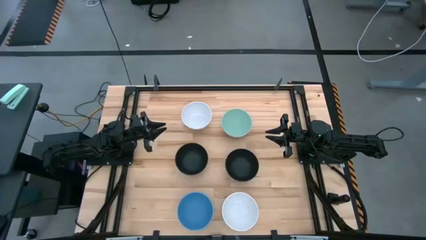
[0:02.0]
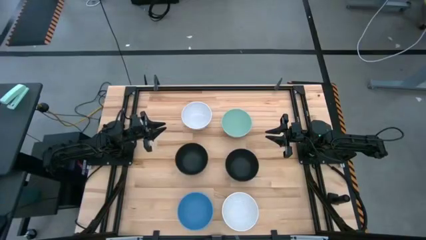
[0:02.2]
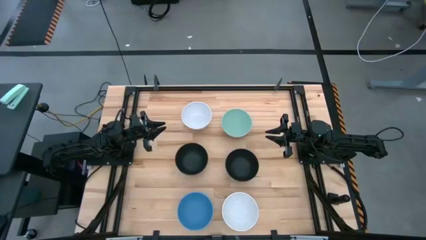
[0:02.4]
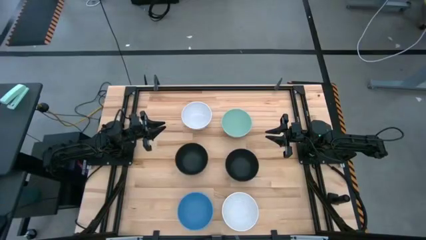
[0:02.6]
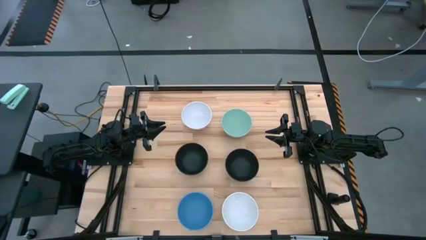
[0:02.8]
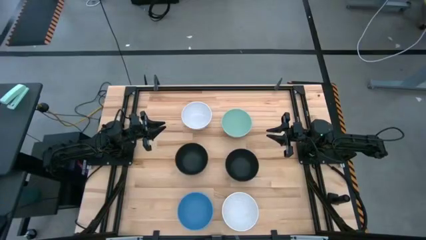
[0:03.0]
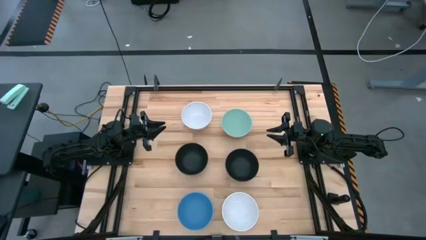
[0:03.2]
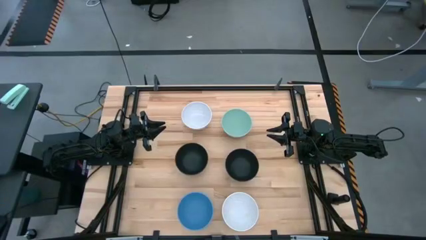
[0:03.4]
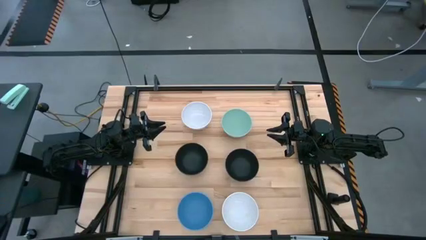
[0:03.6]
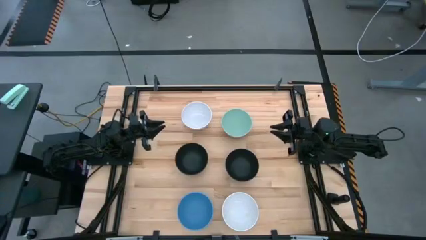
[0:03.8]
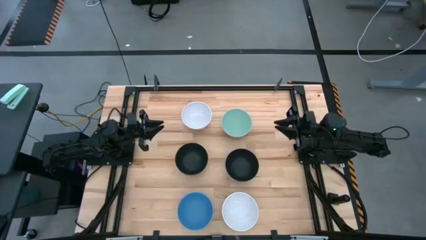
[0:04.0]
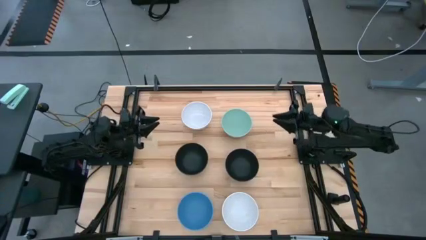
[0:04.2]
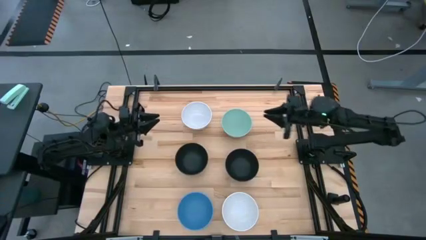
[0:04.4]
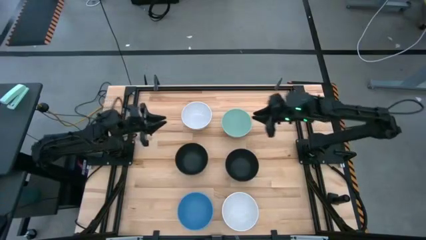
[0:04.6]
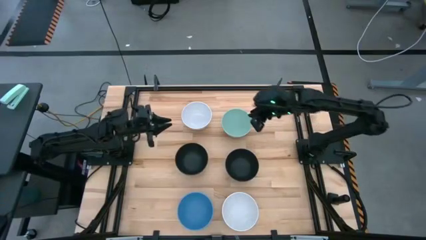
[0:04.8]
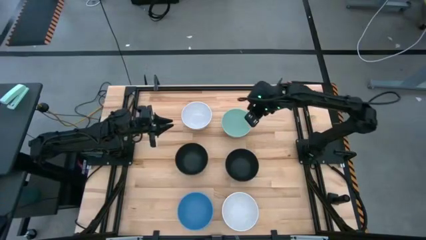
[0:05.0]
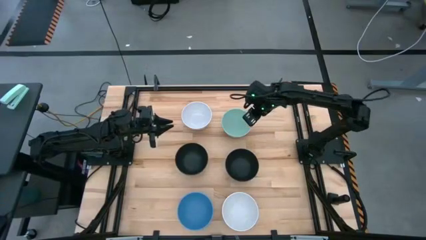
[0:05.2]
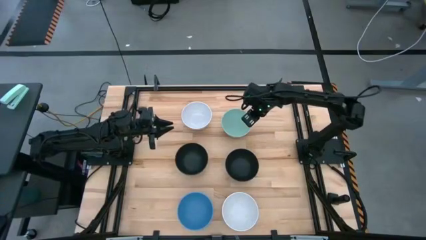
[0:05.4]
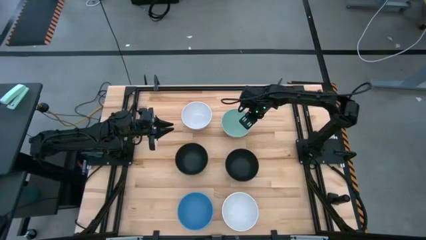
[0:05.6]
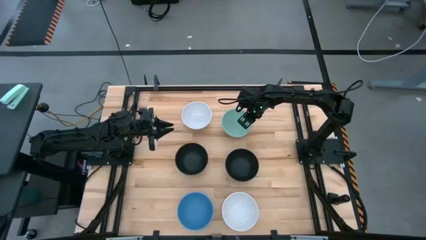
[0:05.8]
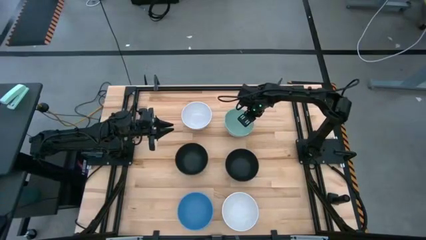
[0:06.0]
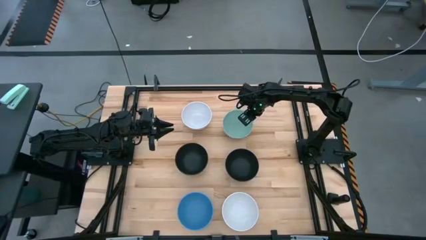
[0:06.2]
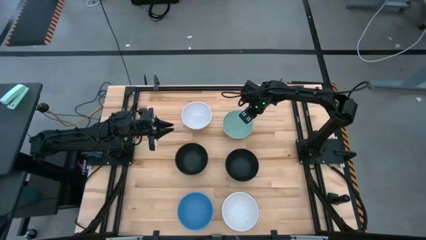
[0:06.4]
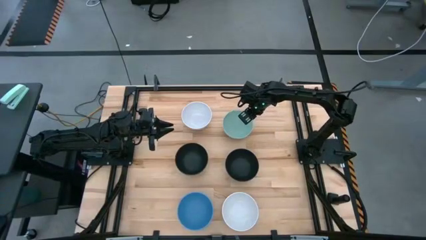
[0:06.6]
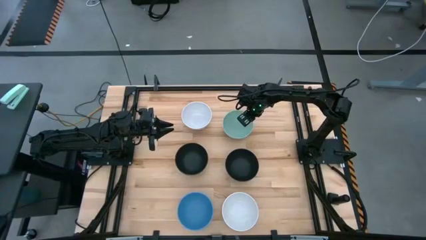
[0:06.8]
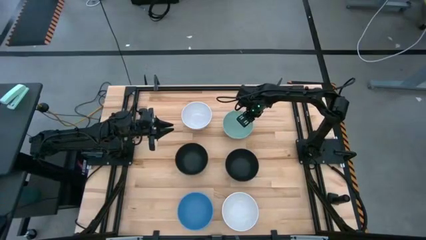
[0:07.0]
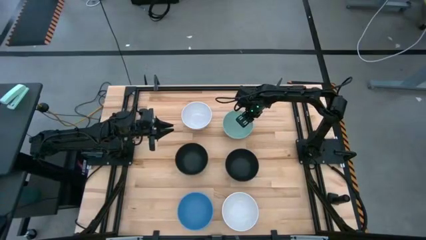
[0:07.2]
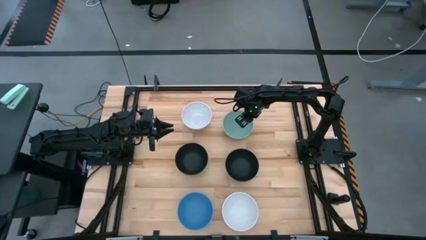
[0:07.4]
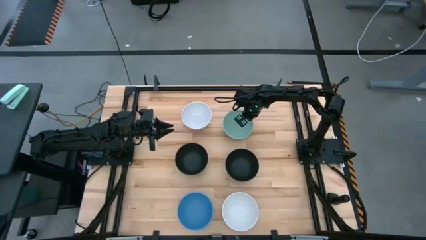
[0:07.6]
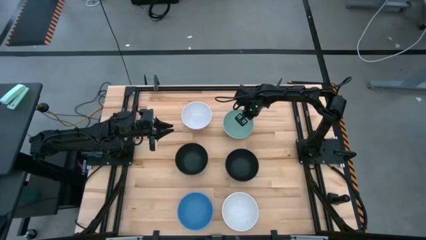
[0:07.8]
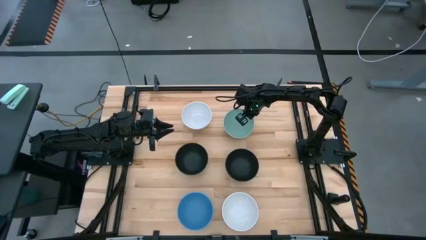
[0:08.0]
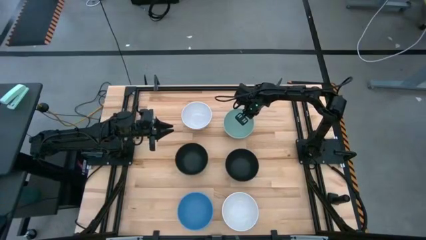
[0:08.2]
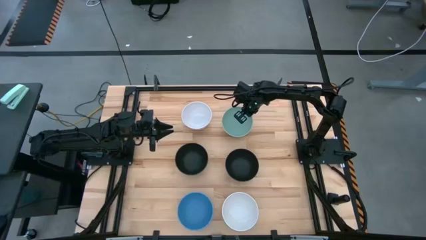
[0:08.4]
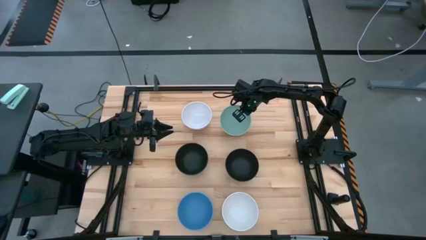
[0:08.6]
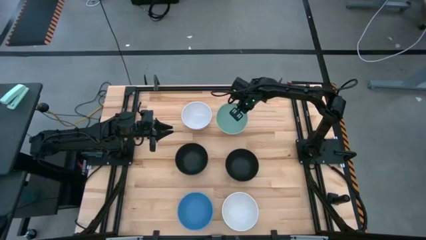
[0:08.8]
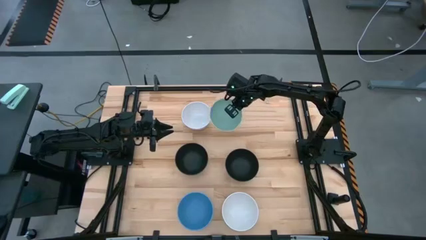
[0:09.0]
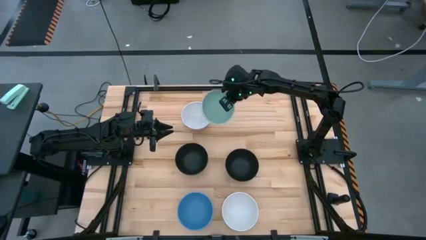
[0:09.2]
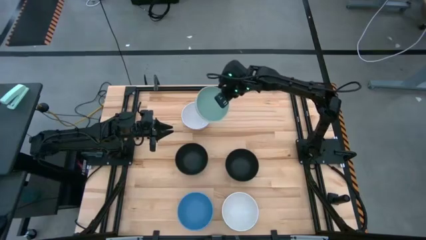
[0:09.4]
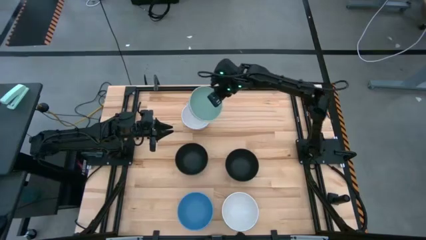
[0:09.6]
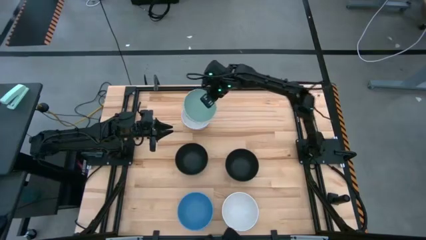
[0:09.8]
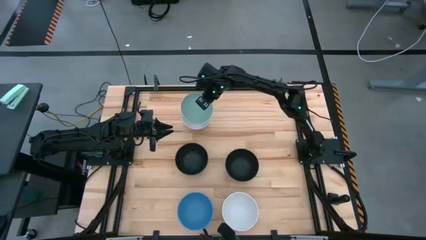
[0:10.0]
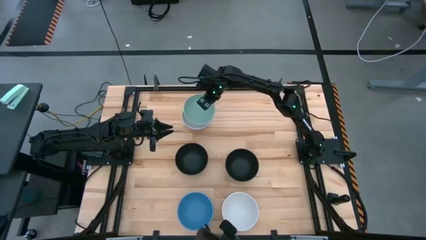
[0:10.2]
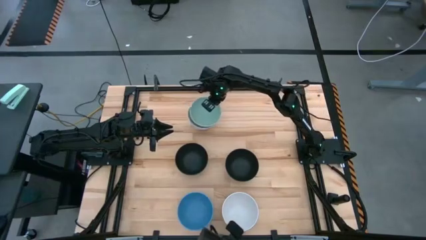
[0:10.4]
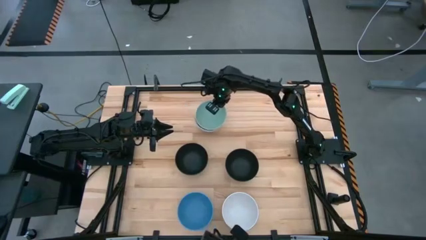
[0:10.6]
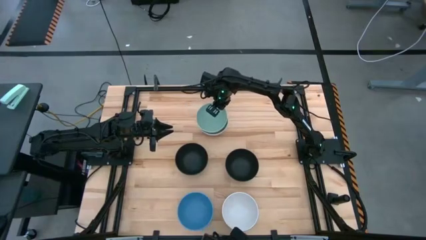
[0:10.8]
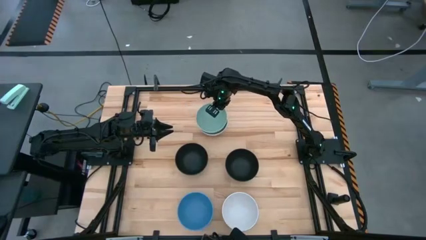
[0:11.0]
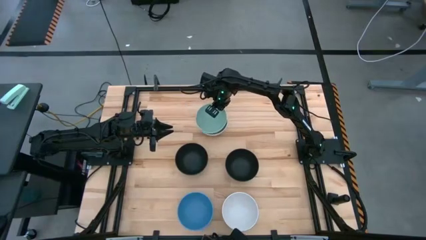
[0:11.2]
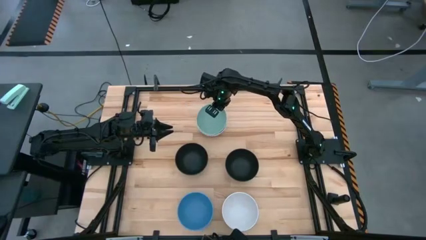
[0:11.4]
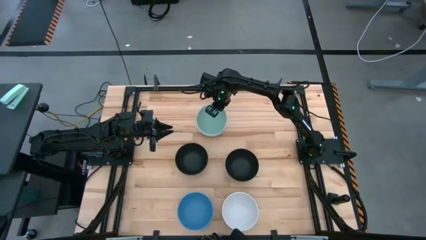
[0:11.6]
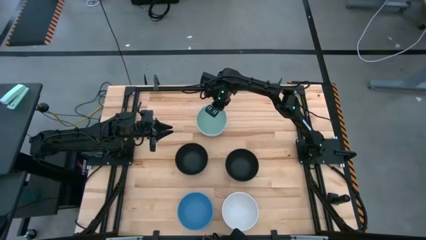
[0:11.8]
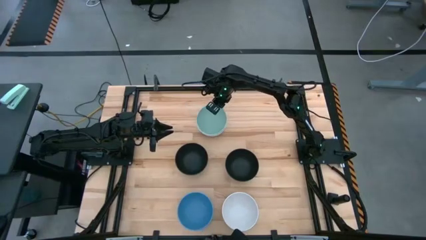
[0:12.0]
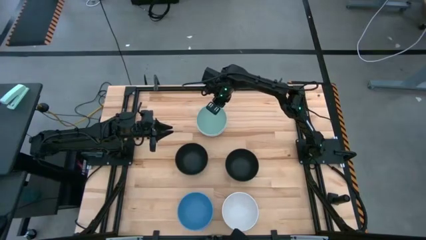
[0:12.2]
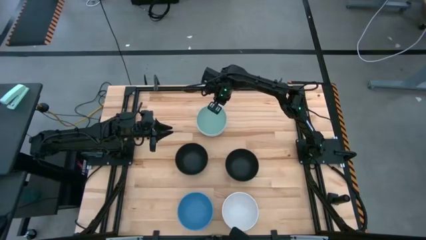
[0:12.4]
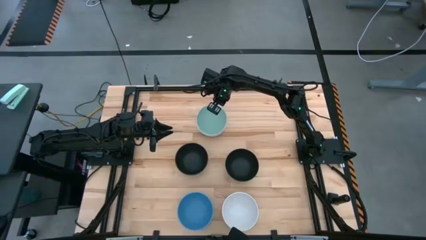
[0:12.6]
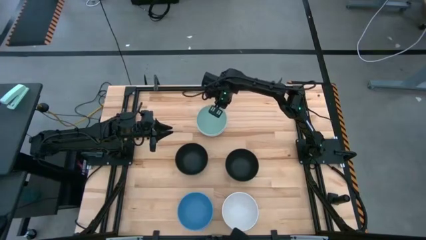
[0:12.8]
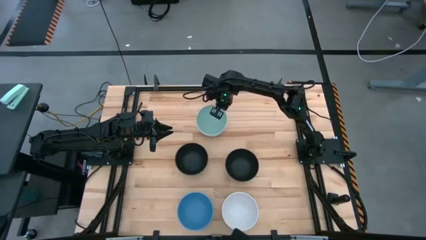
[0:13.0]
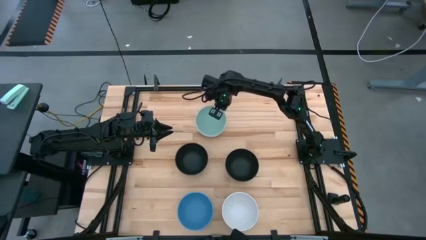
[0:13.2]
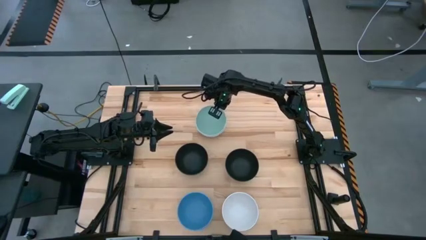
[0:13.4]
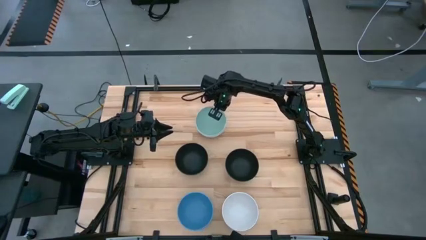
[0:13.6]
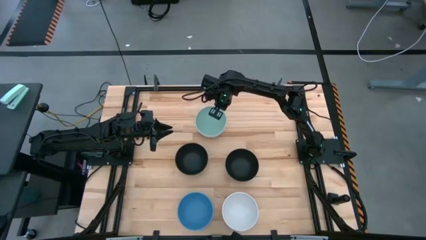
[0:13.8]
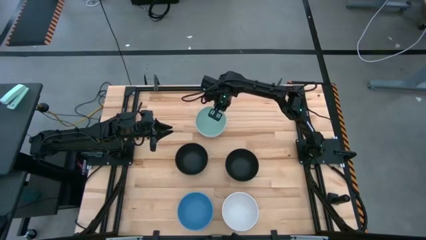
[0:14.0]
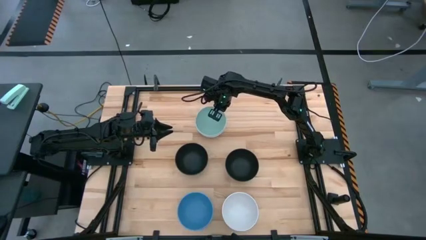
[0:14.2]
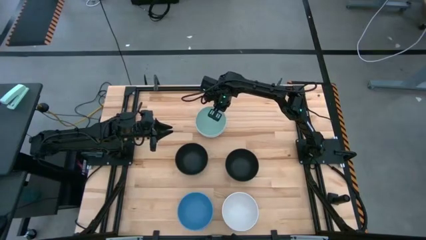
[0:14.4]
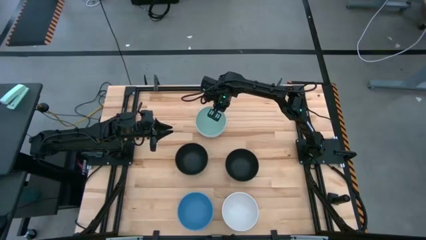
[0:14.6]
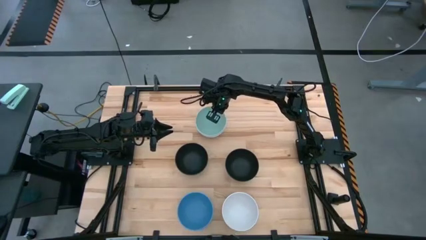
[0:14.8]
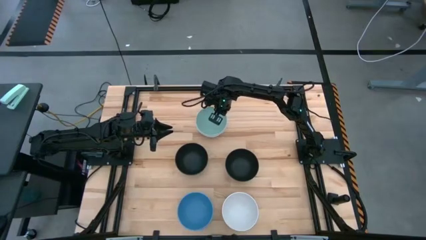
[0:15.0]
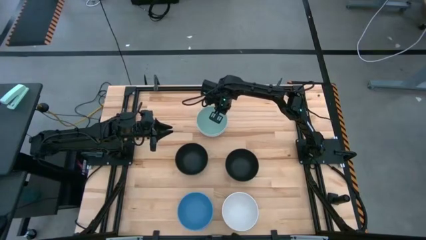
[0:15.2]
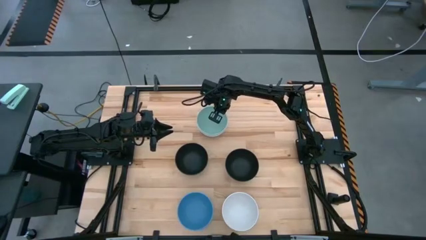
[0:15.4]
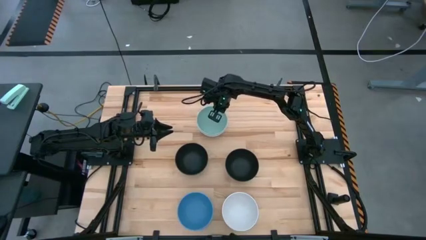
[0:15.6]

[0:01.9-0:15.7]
Task: Nest bowls inside each other
Stack the light blue bowl on top of the top white bowl
